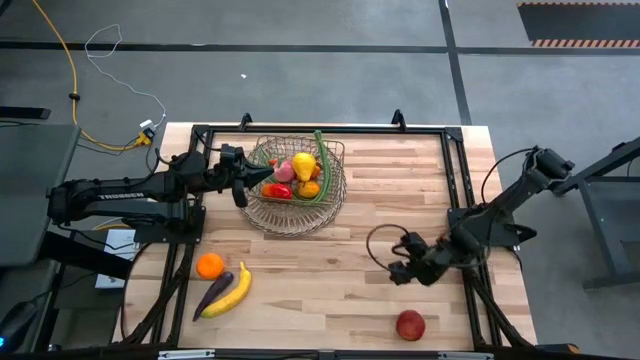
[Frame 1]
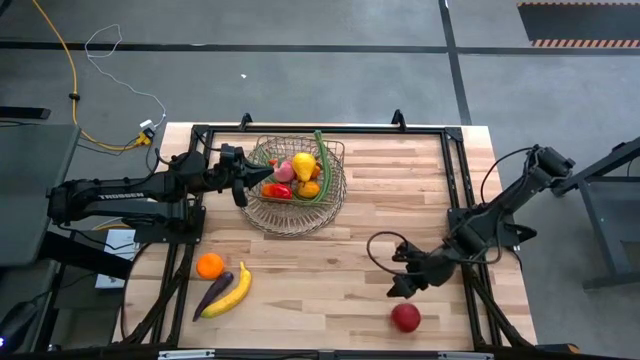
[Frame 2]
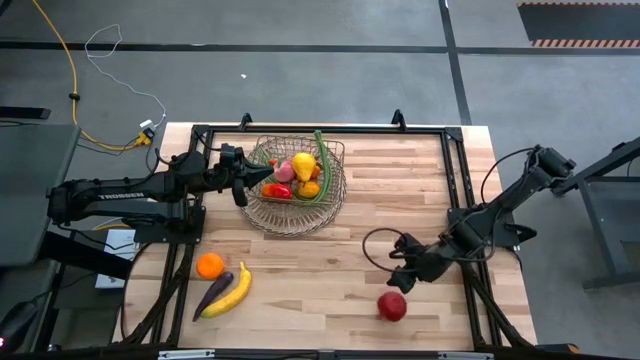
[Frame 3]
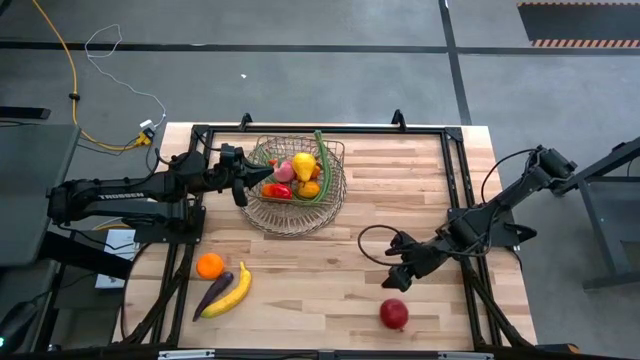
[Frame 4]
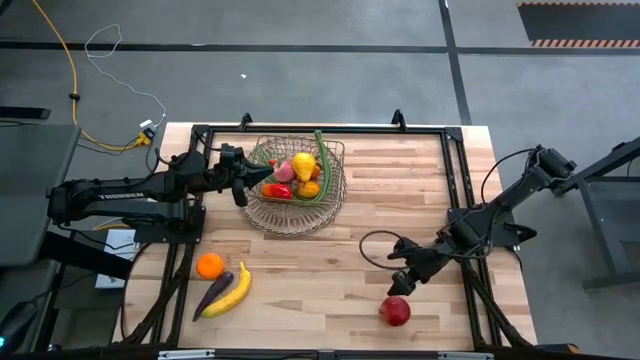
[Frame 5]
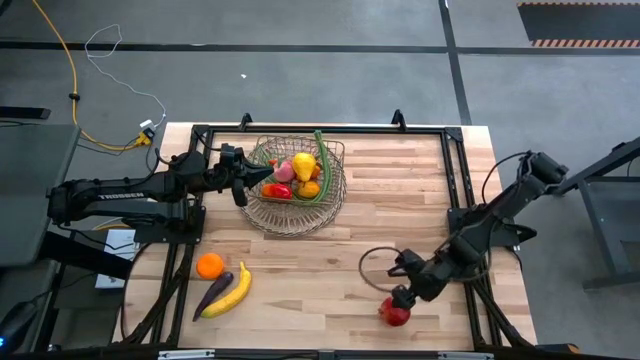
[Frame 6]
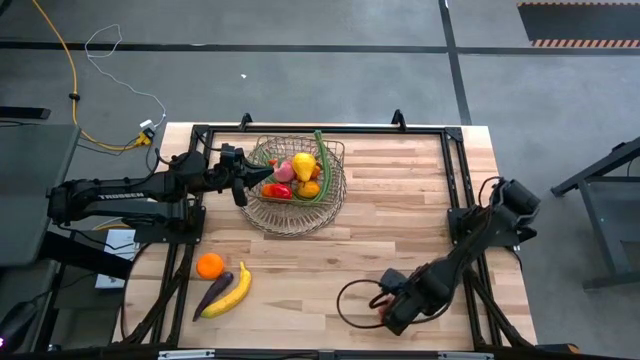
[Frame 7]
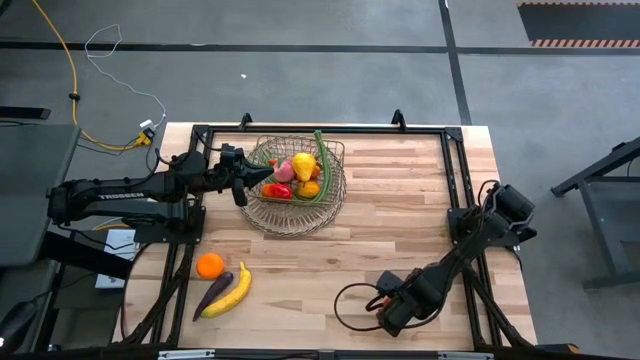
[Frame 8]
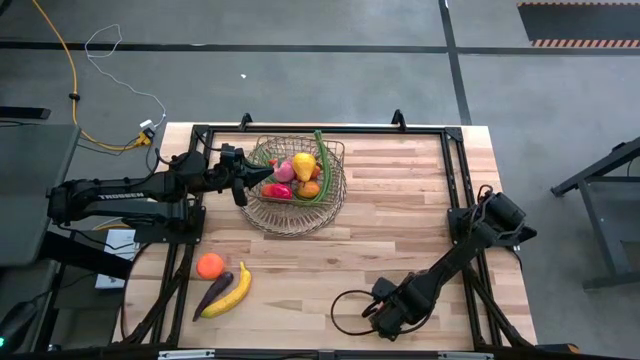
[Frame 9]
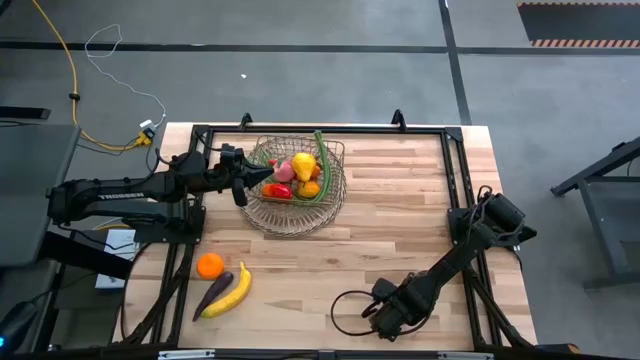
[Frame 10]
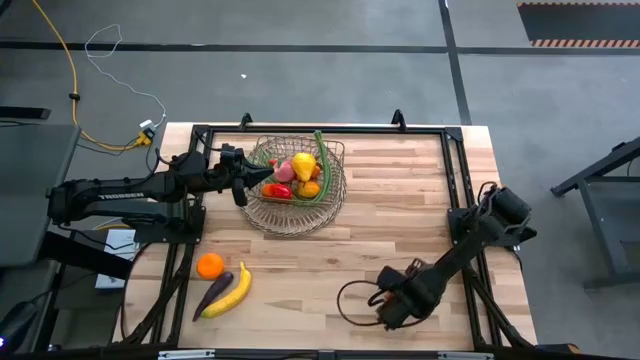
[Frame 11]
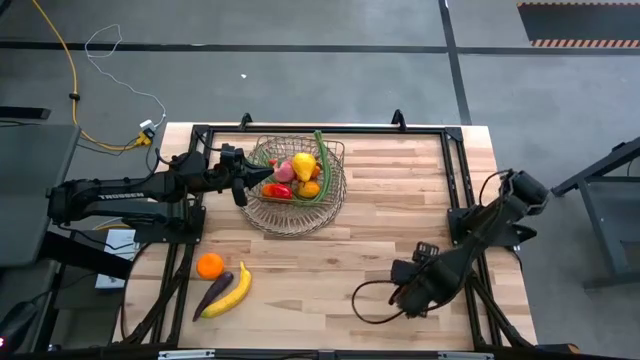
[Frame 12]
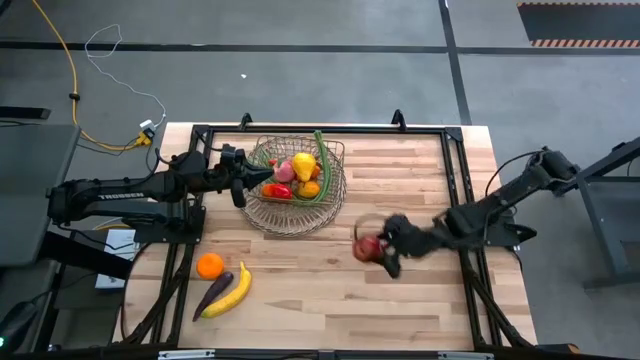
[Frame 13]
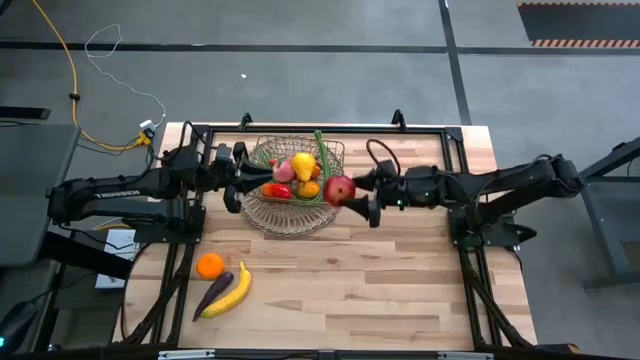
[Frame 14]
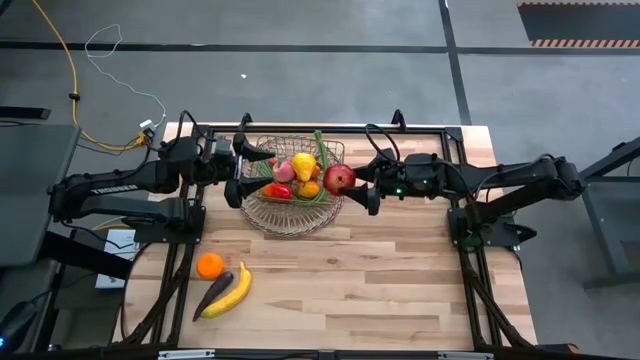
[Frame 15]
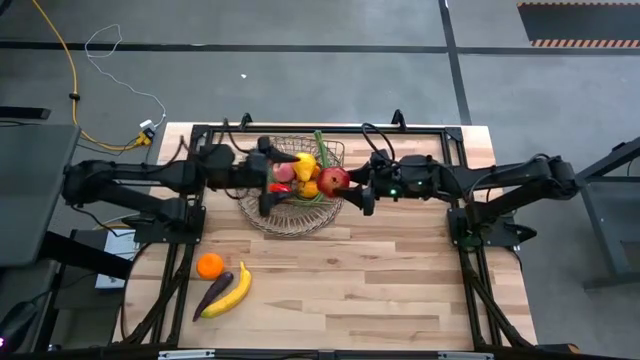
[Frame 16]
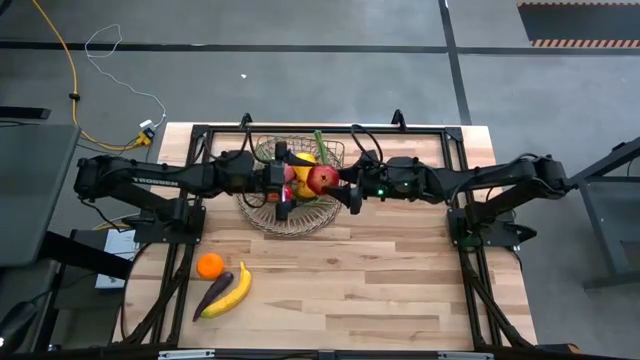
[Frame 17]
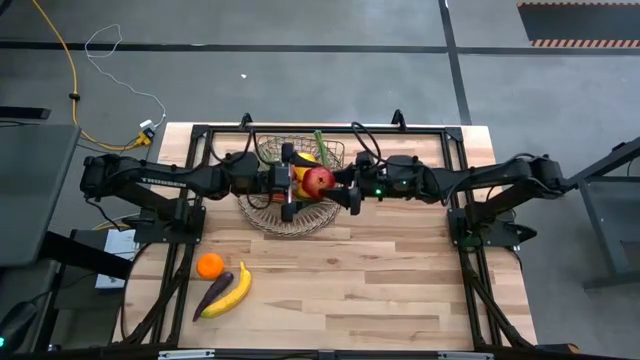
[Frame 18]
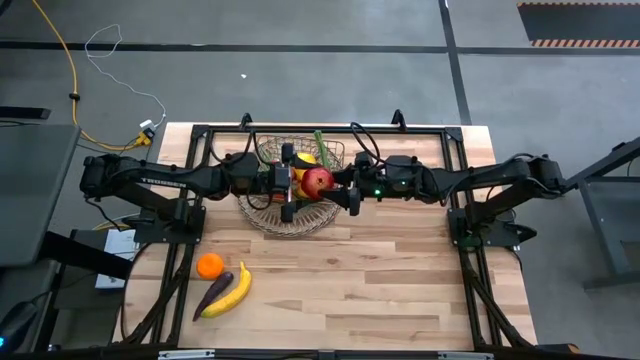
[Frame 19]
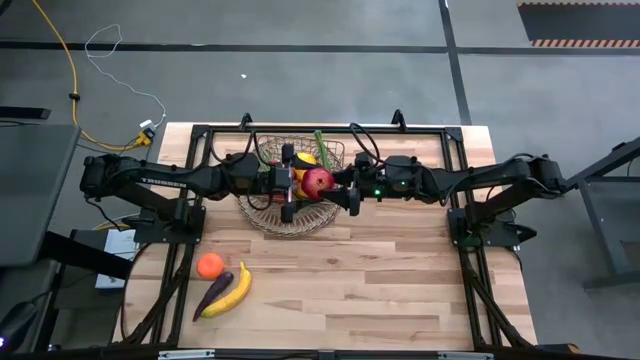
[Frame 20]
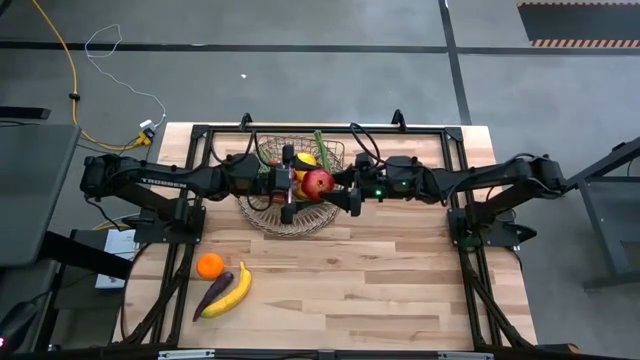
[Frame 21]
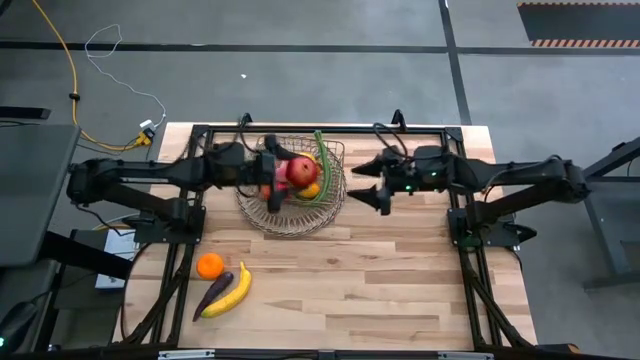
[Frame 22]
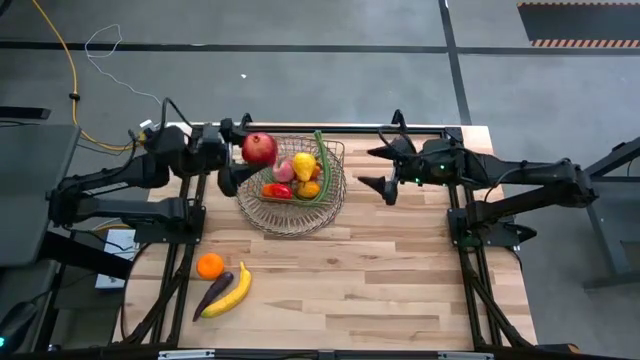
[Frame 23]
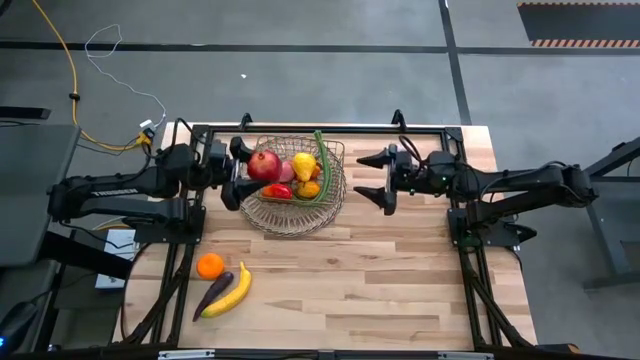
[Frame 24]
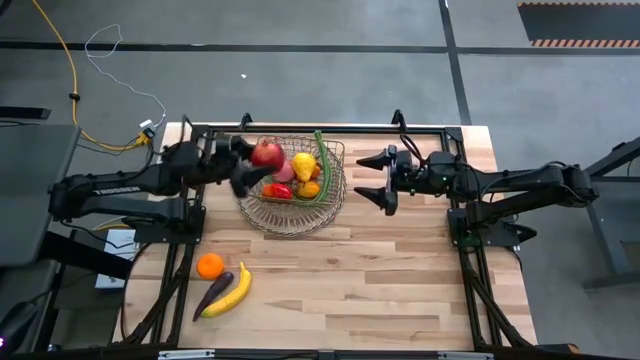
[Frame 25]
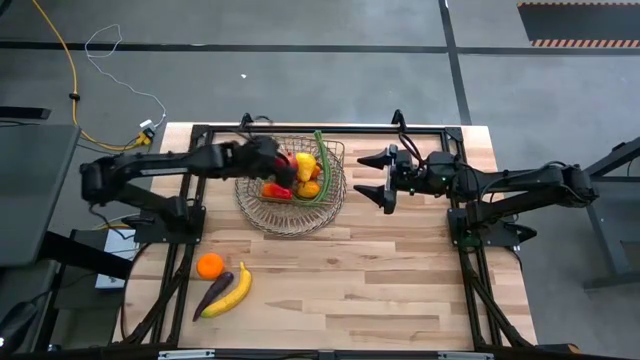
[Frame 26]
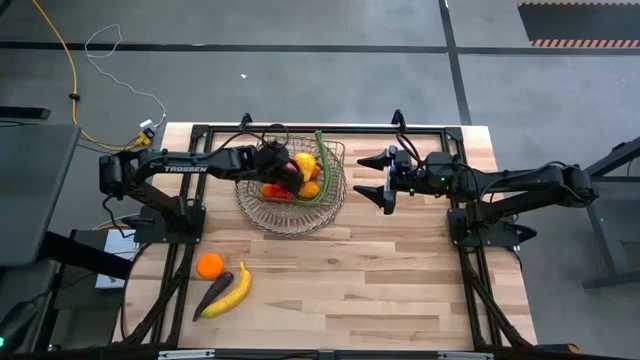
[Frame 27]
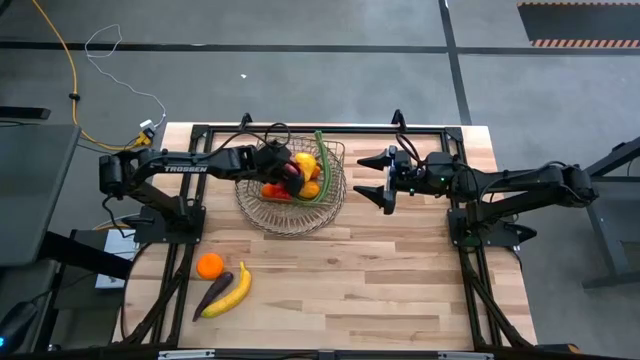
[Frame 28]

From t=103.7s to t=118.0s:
Task: Build produce basket
Put the pomegranate into the wire basket

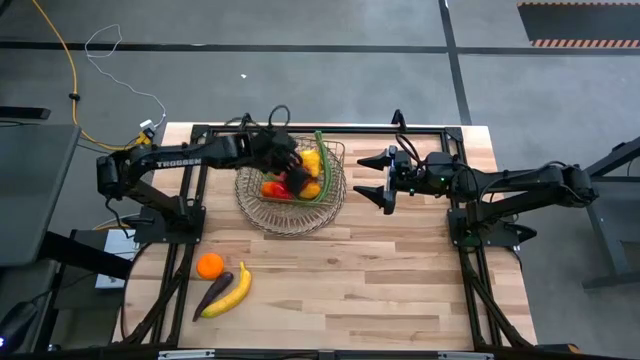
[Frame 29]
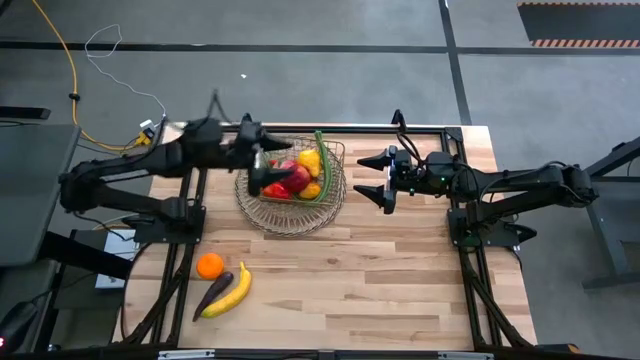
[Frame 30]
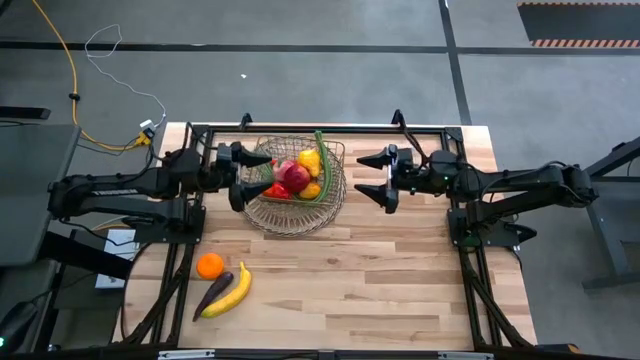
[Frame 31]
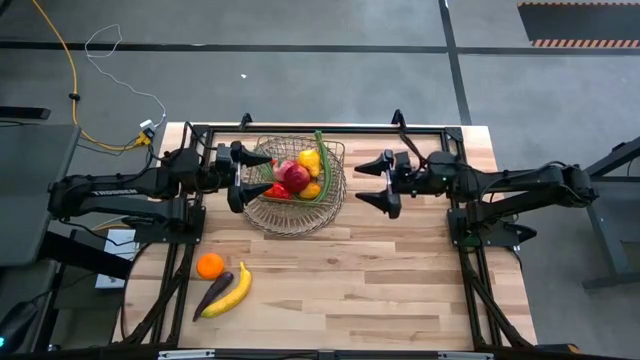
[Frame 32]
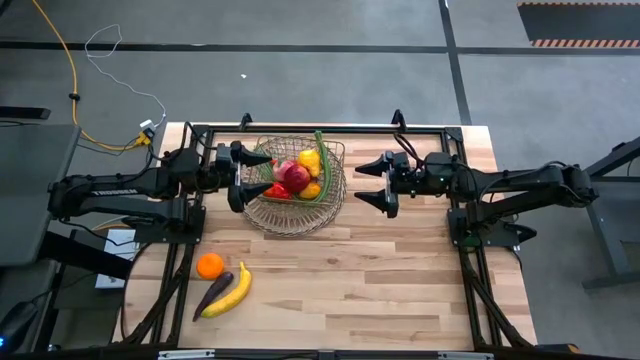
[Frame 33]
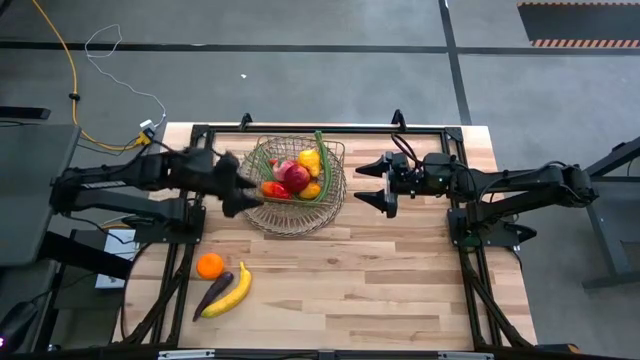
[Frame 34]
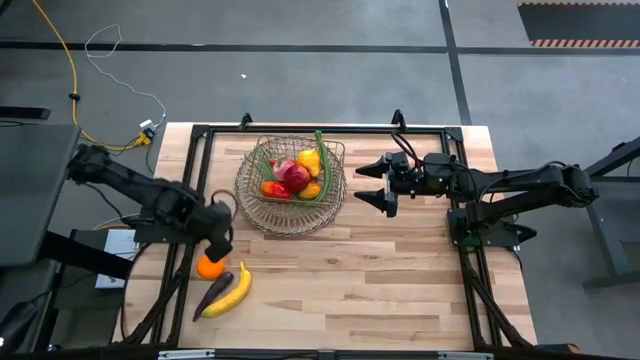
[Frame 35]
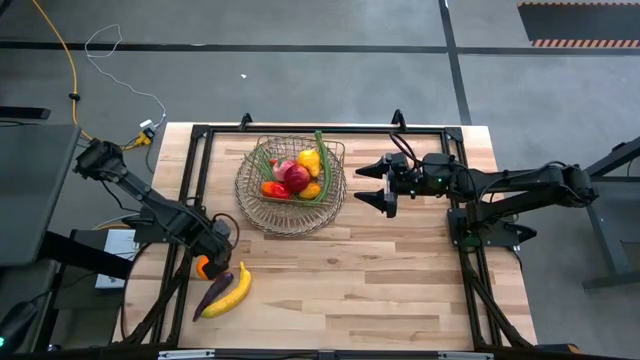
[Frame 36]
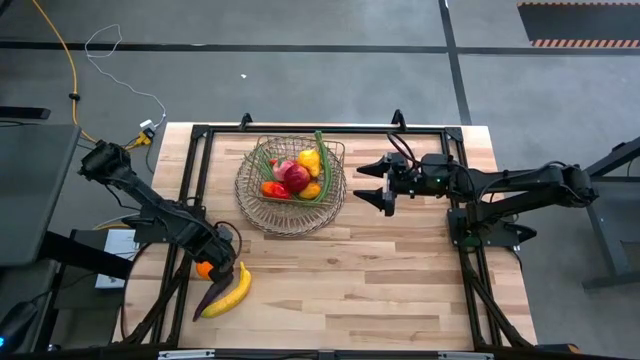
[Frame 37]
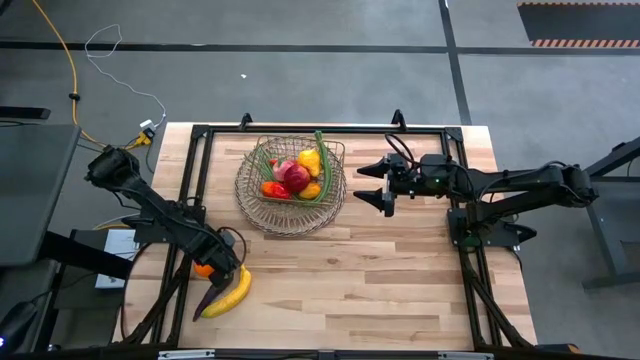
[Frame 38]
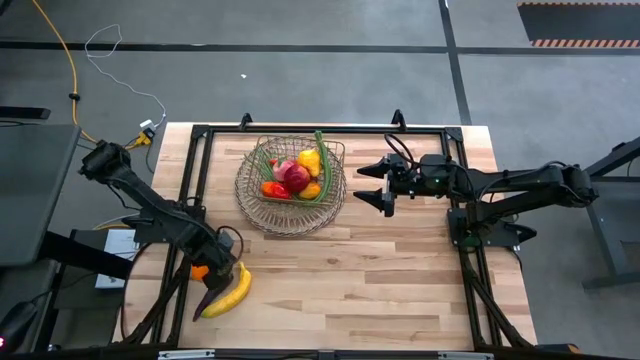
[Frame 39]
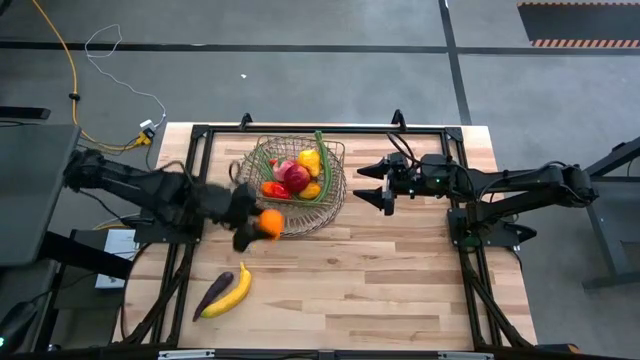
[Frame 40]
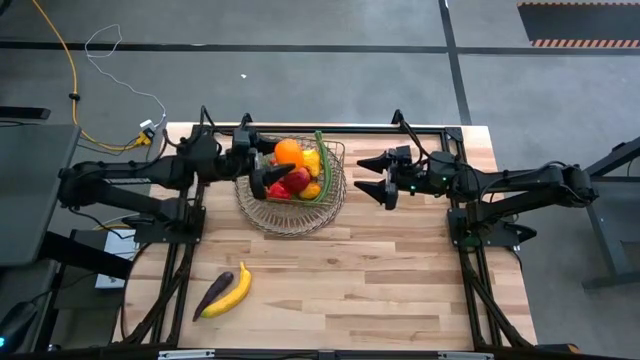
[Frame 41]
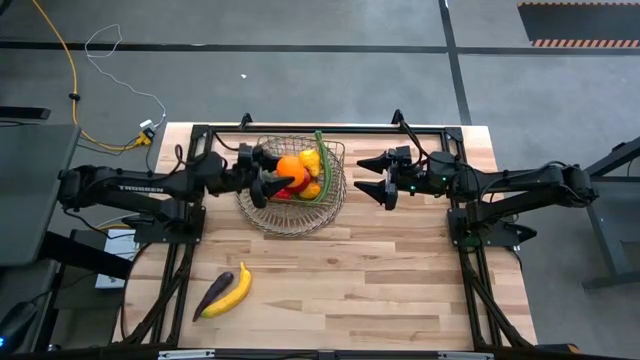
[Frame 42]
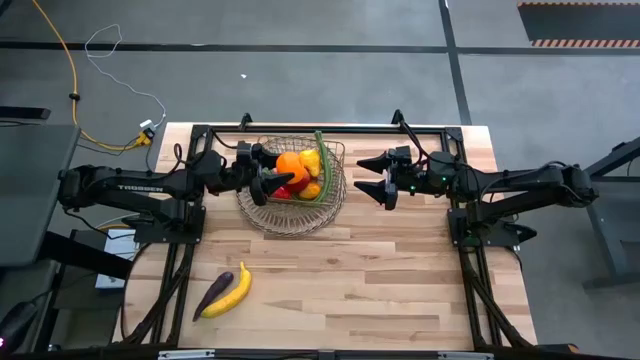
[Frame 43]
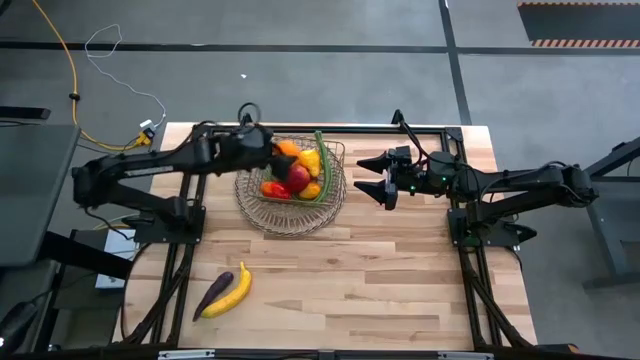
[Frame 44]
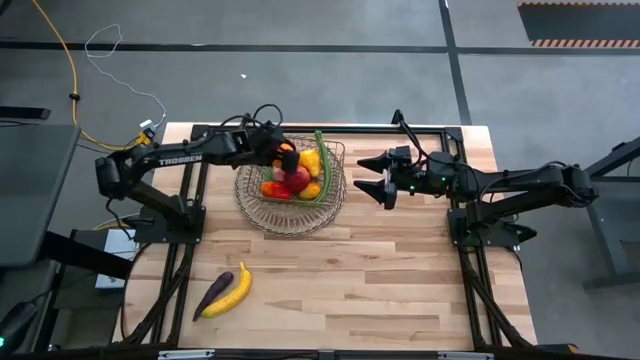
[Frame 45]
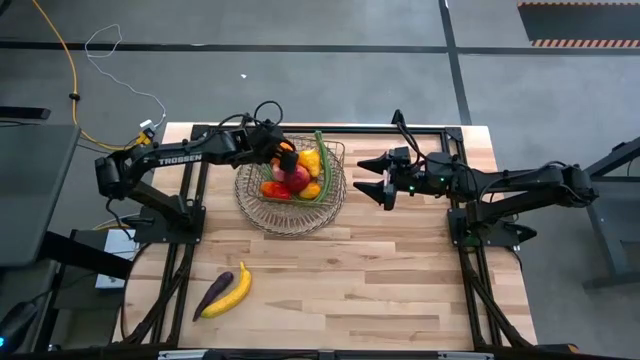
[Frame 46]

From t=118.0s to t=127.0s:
Put the orange into the wire basket
